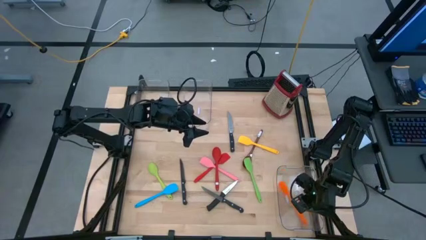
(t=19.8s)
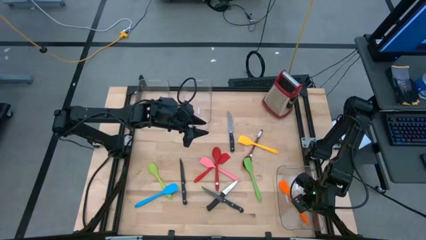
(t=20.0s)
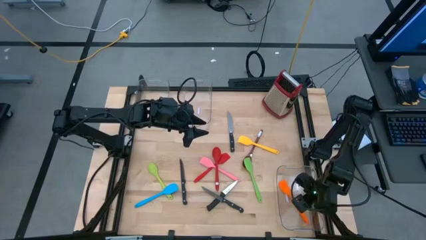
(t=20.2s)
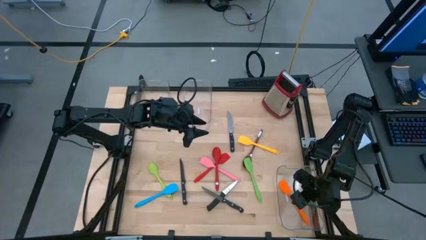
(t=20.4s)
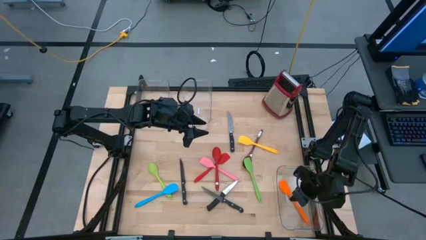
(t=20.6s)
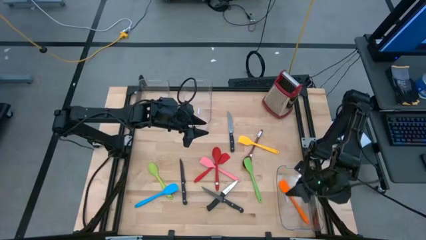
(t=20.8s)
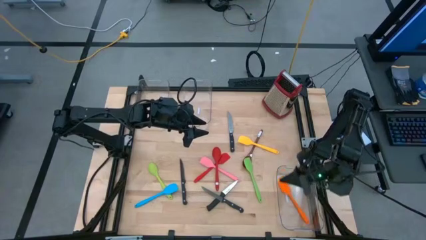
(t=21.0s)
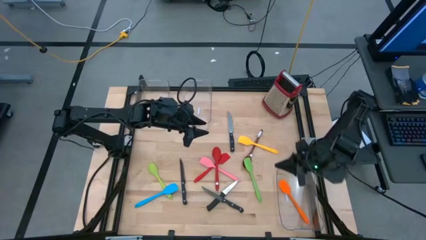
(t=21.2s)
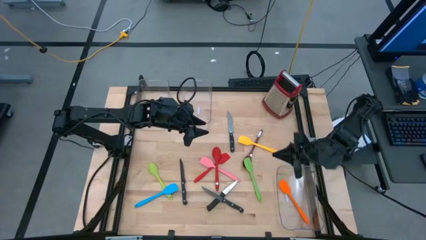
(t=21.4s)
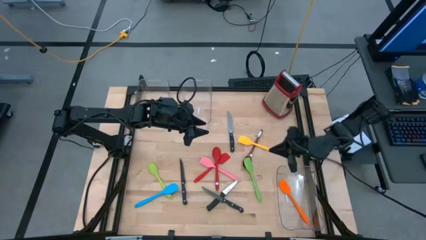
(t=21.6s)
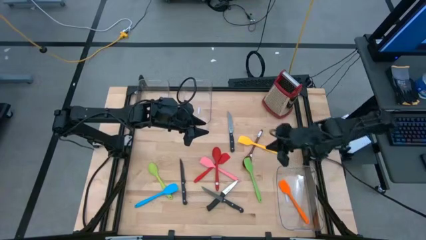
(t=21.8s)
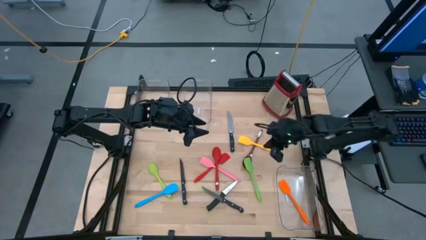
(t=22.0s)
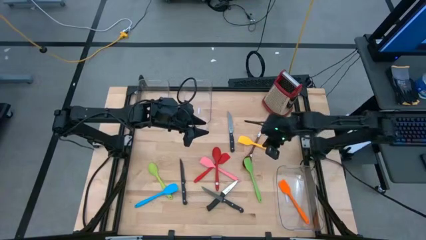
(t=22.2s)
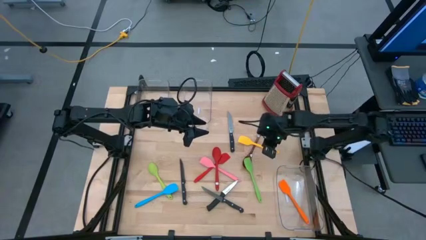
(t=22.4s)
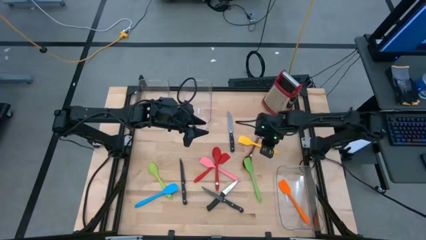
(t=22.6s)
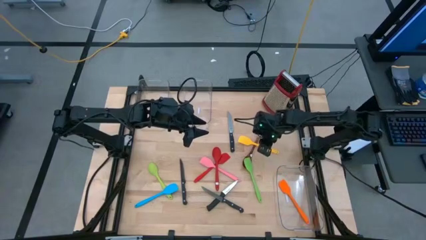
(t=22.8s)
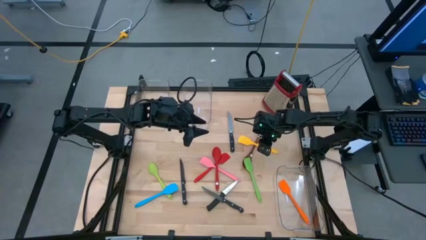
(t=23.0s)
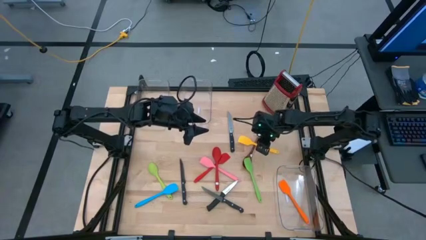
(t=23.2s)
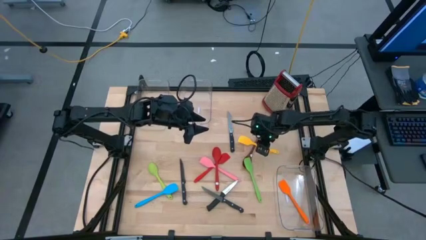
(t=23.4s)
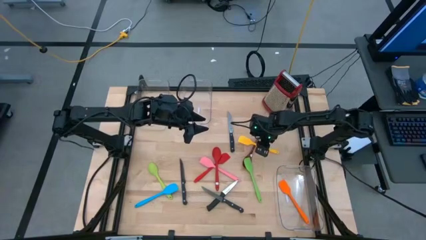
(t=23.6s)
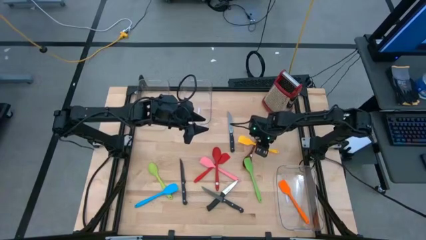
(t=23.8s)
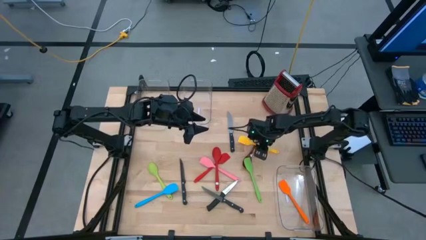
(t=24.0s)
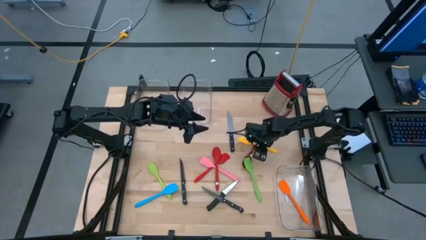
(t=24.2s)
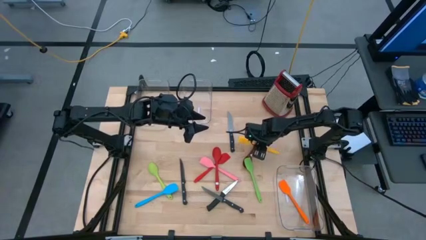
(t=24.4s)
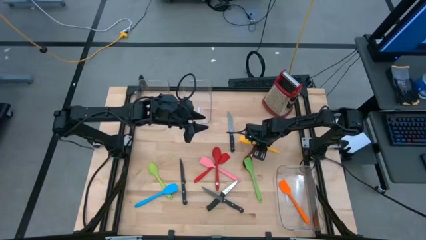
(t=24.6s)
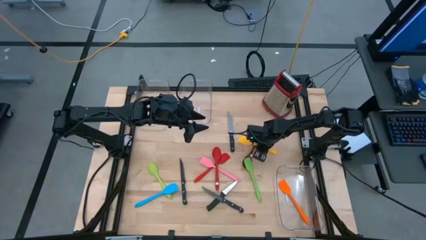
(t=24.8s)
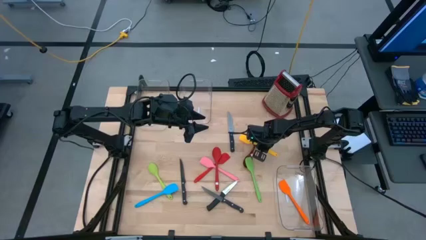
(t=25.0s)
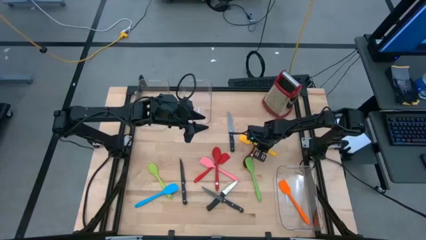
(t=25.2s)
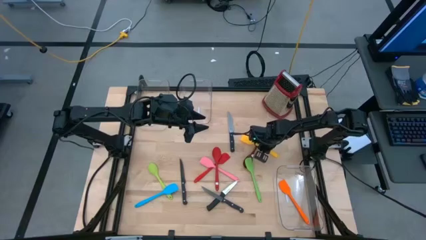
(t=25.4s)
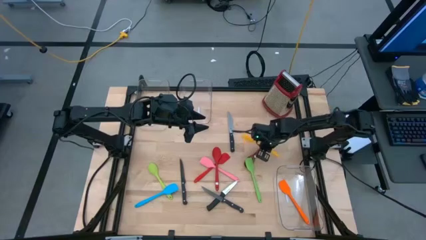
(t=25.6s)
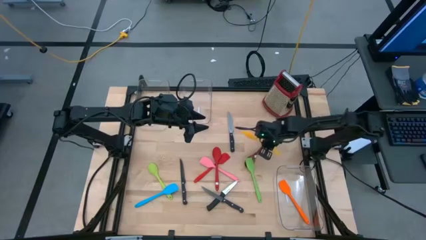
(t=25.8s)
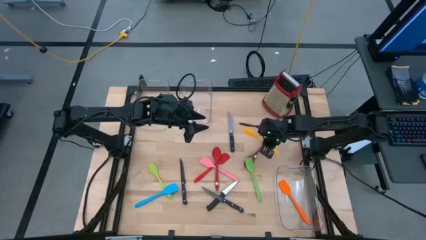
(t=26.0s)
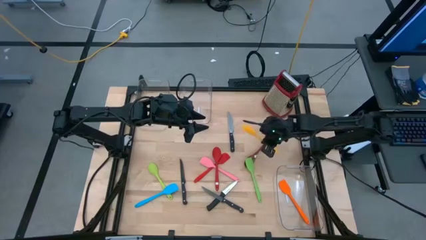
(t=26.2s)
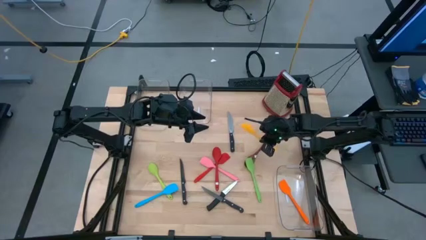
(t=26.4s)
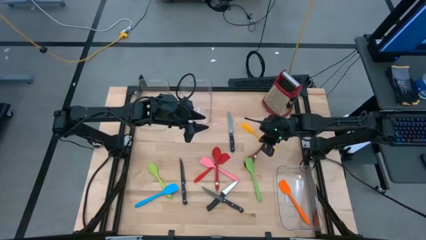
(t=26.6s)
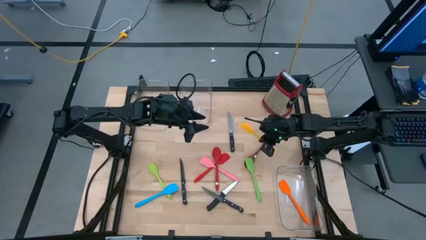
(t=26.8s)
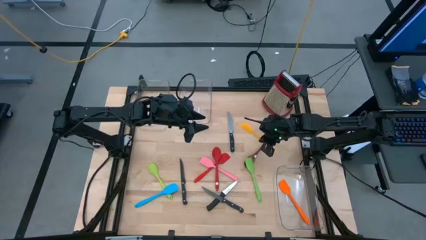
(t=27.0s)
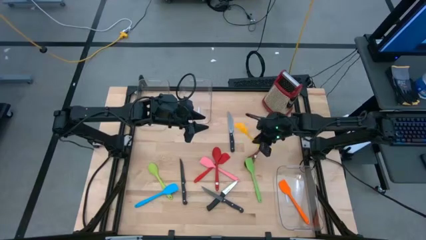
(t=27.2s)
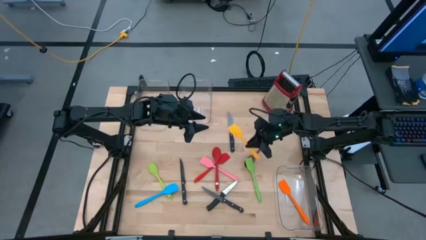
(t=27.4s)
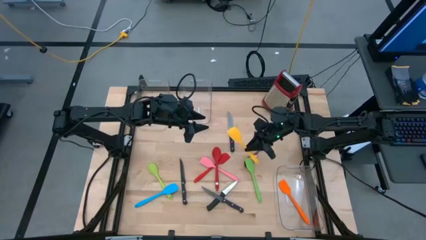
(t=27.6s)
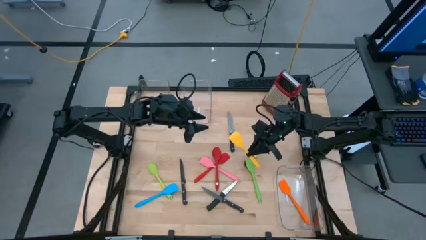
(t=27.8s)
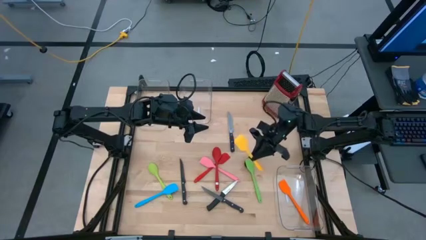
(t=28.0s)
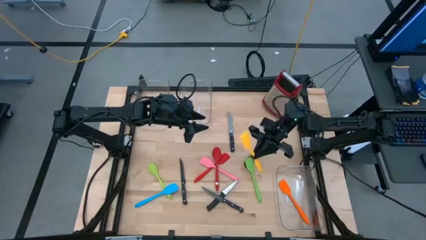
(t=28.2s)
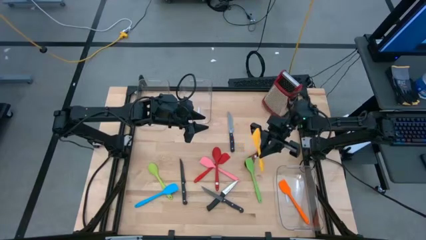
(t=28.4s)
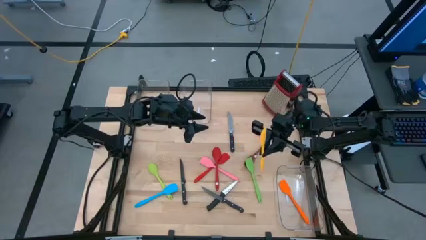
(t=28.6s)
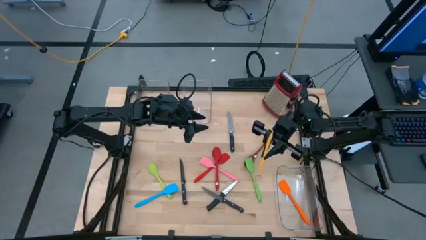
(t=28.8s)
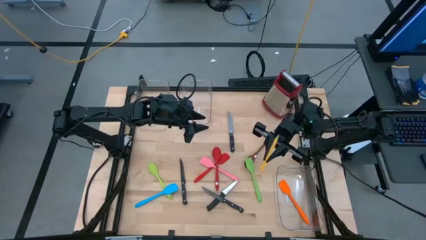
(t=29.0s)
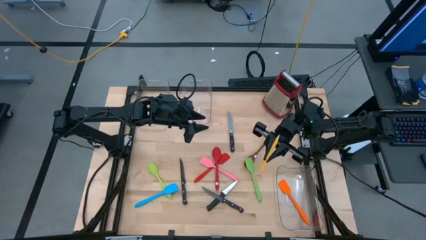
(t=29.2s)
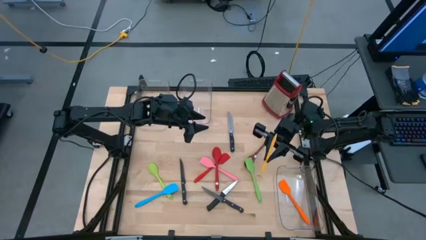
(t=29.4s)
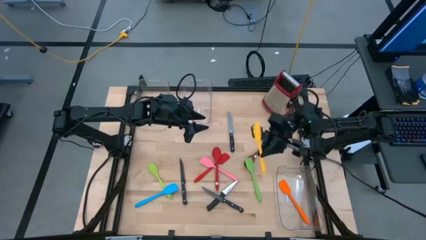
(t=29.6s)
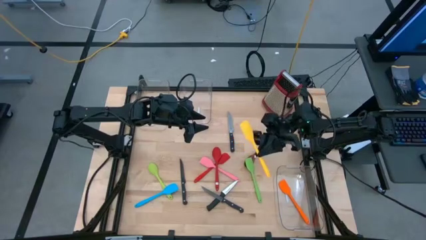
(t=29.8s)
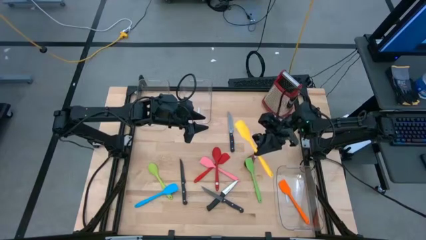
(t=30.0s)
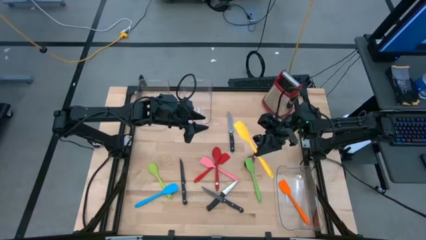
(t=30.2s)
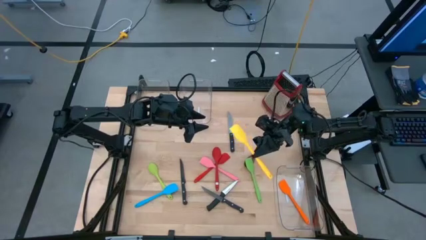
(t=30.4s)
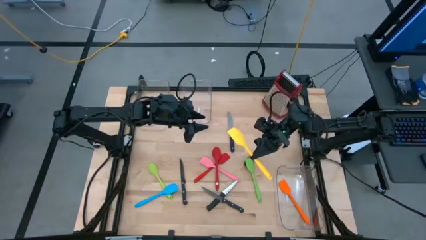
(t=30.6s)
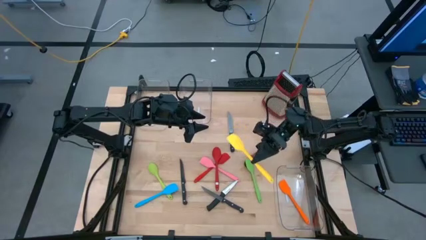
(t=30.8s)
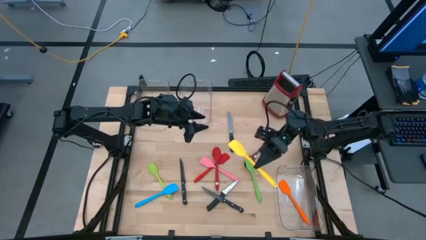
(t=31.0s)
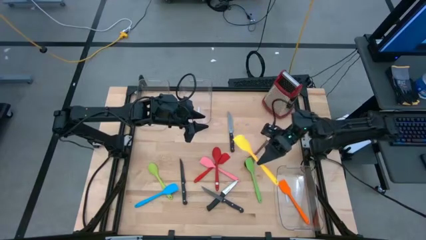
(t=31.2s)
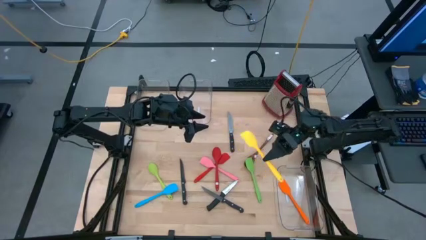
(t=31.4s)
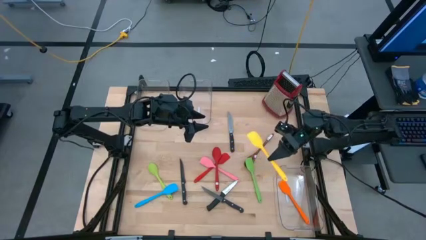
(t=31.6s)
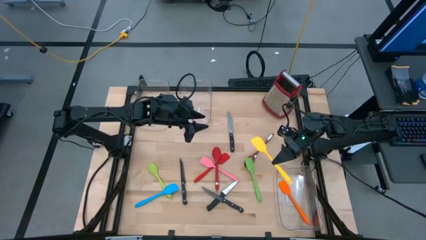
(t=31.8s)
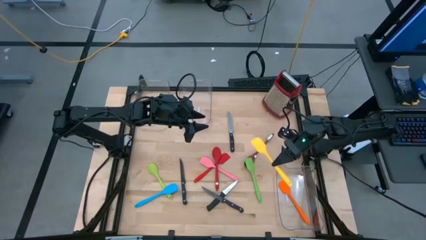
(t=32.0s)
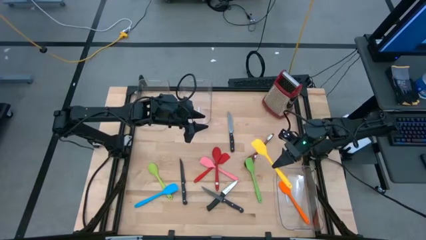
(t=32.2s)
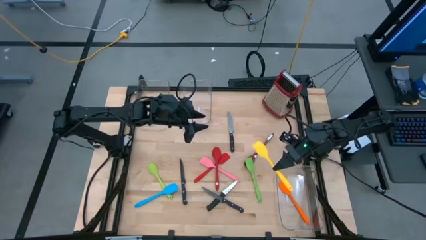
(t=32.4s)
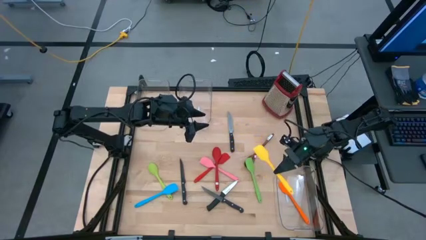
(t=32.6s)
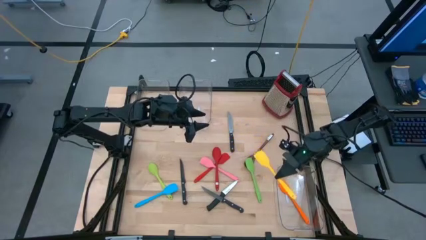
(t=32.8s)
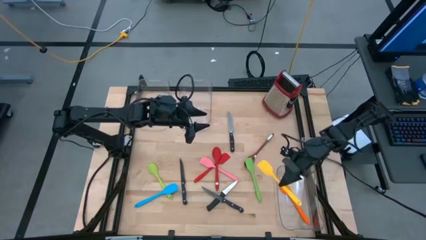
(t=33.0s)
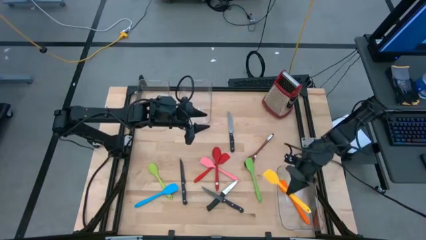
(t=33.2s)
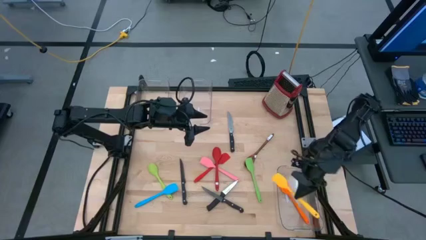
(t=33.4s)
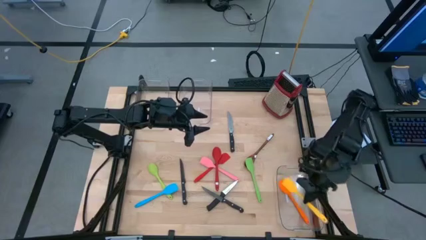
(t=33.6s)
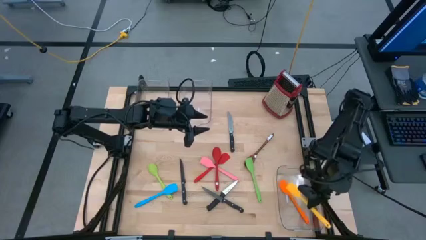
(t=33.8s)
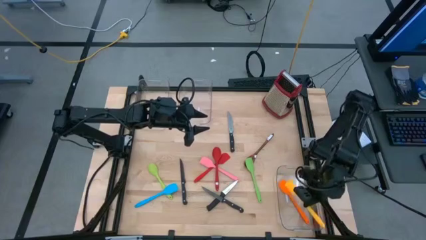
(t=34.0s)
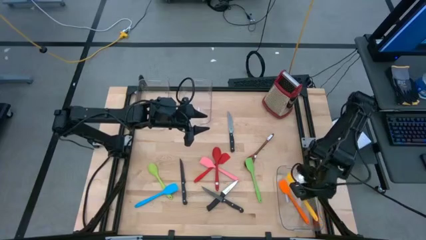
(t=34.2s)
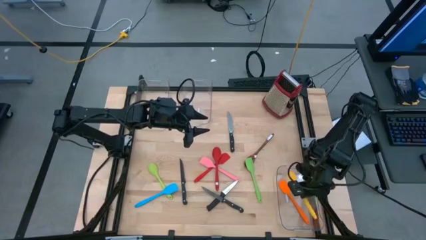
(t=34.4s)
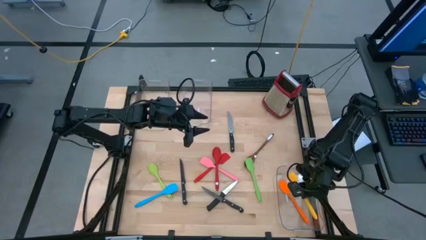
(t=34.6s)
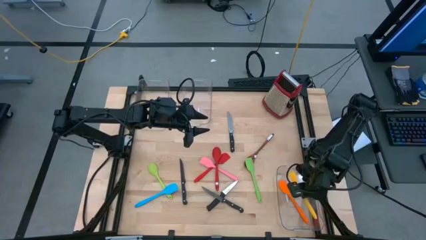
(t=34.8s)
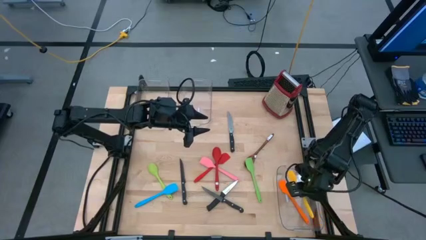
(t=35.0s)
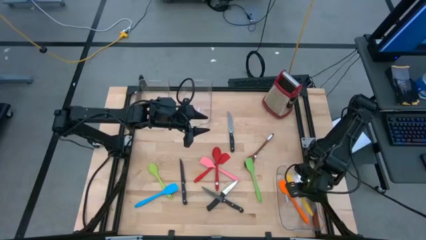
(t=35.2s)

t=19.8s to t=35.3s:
Task: Pick & Place Kitchen Items
Put the yellow spatula into the bottom transparent bin
